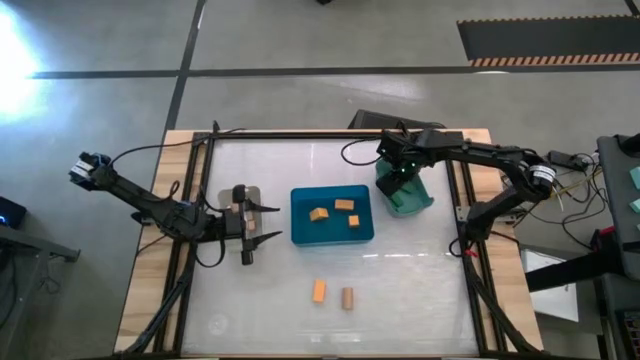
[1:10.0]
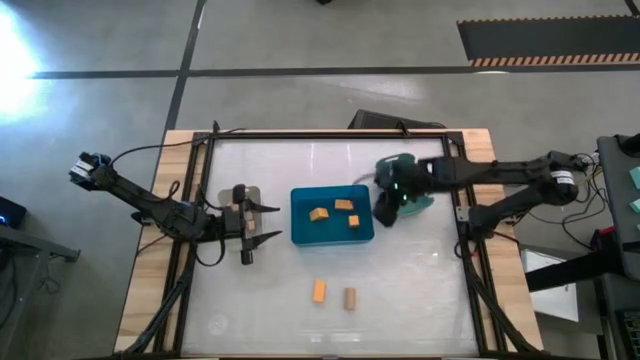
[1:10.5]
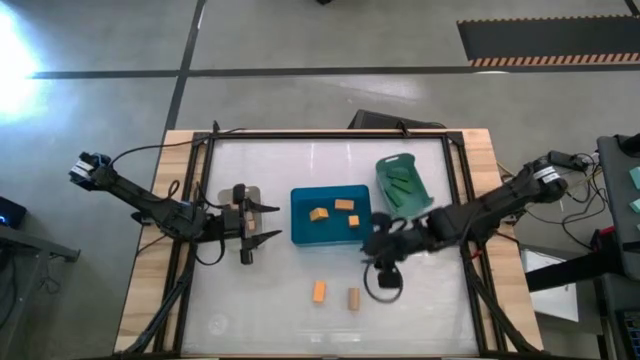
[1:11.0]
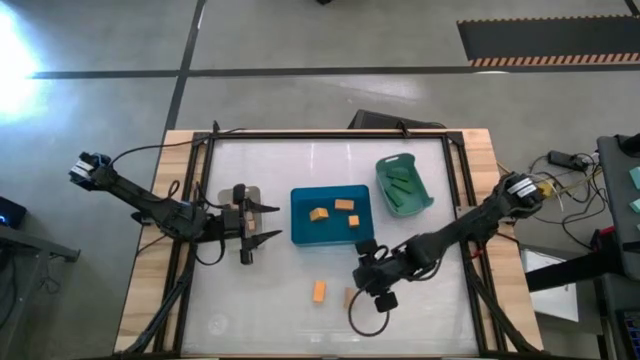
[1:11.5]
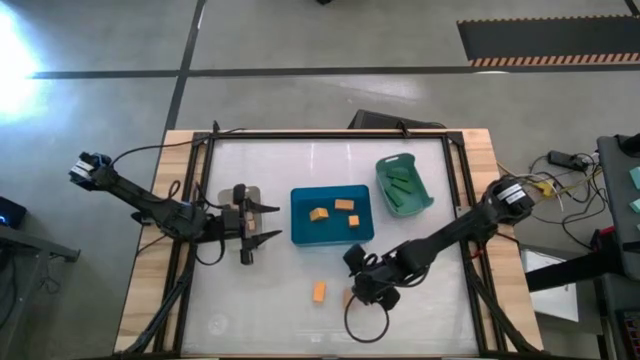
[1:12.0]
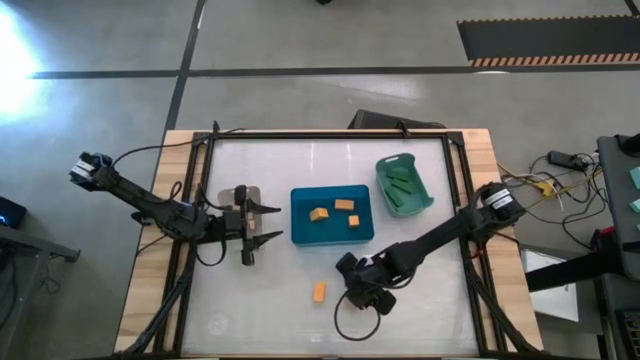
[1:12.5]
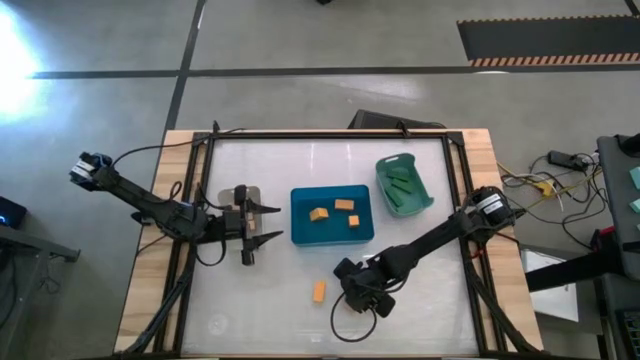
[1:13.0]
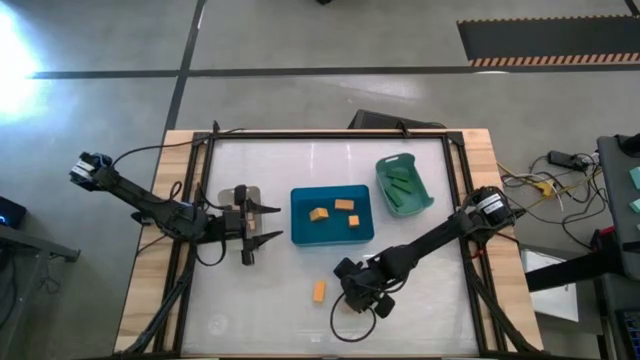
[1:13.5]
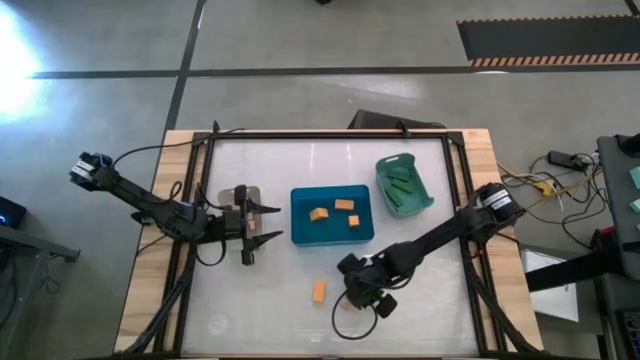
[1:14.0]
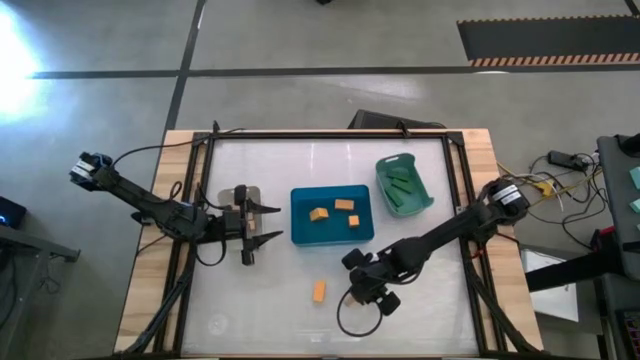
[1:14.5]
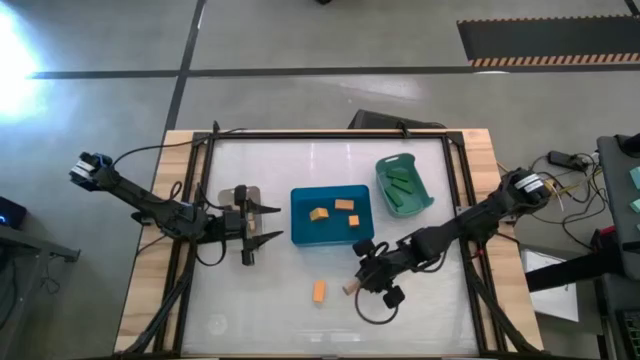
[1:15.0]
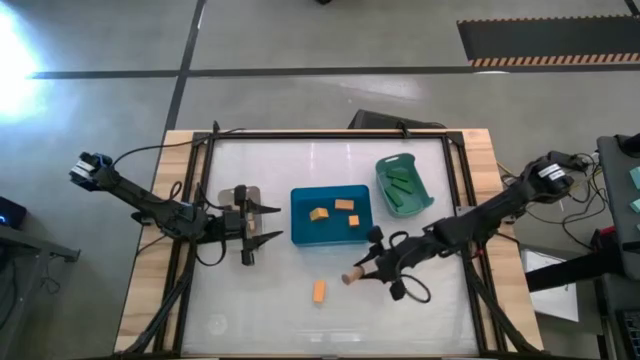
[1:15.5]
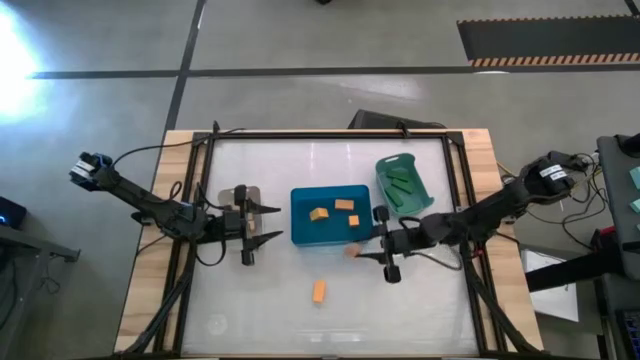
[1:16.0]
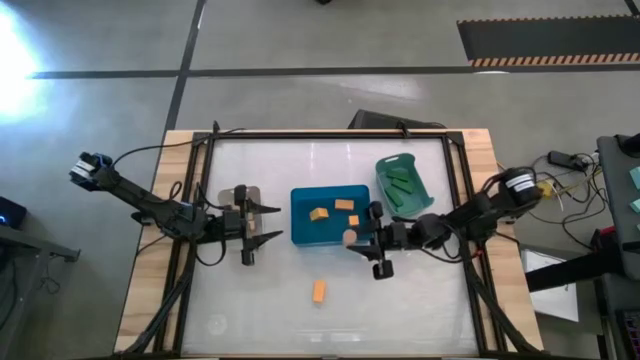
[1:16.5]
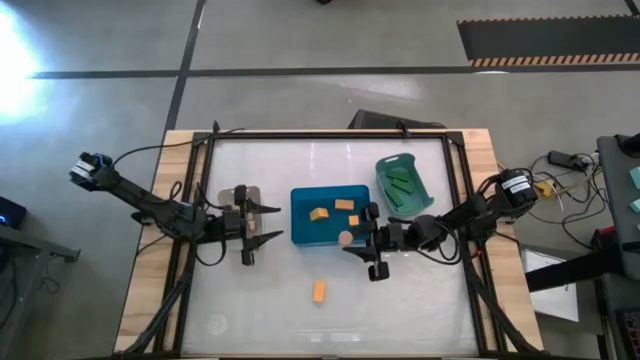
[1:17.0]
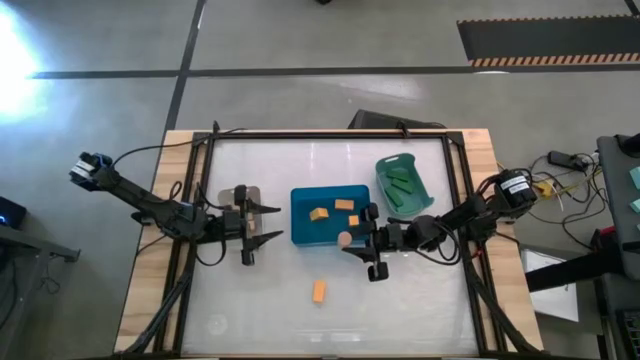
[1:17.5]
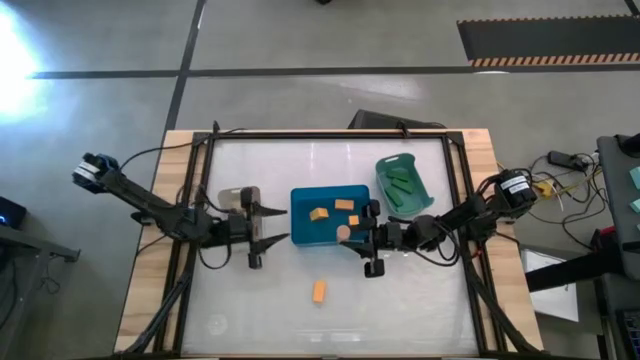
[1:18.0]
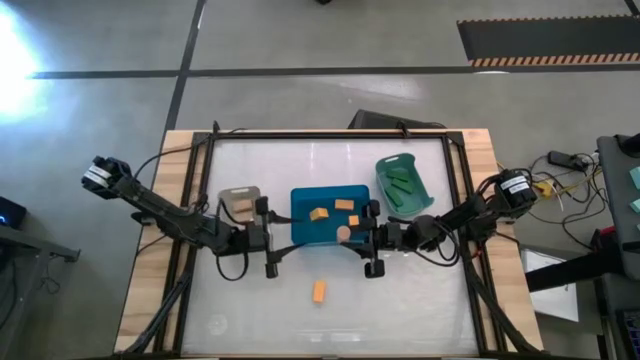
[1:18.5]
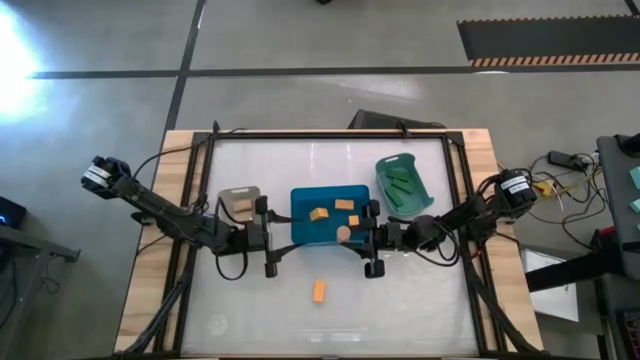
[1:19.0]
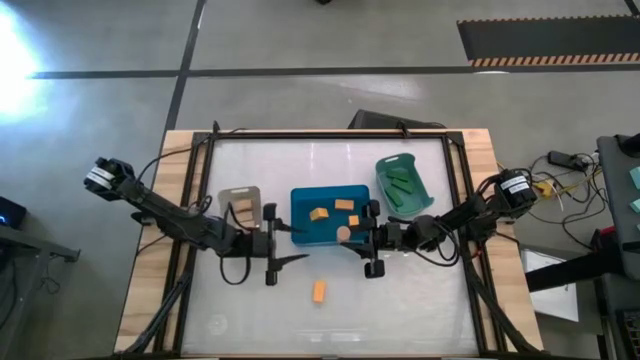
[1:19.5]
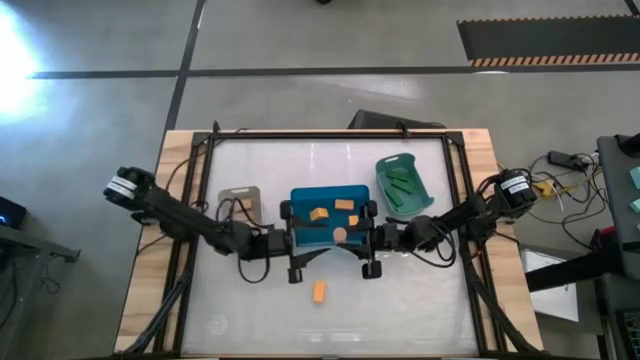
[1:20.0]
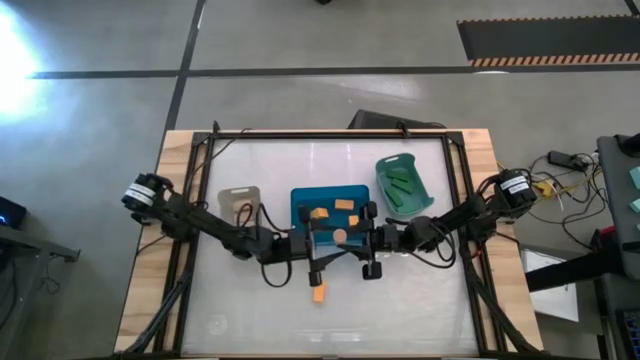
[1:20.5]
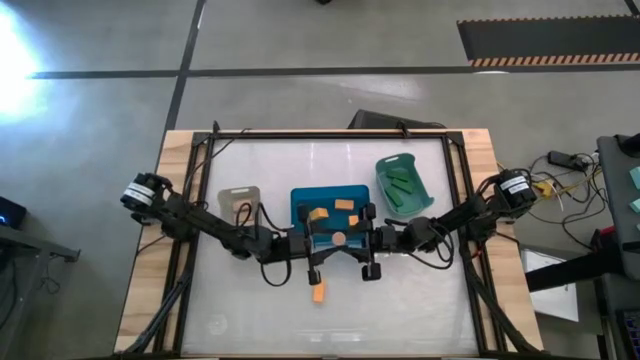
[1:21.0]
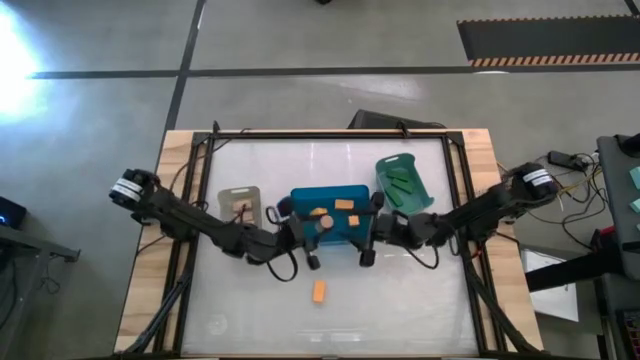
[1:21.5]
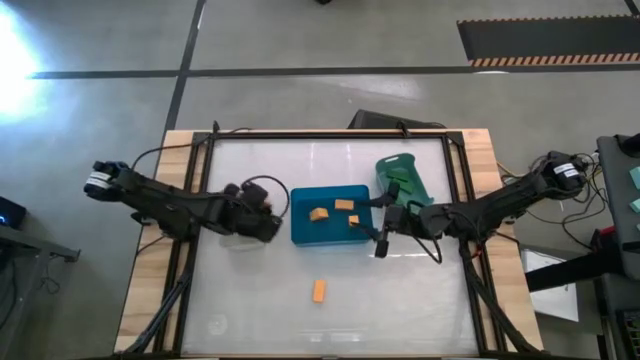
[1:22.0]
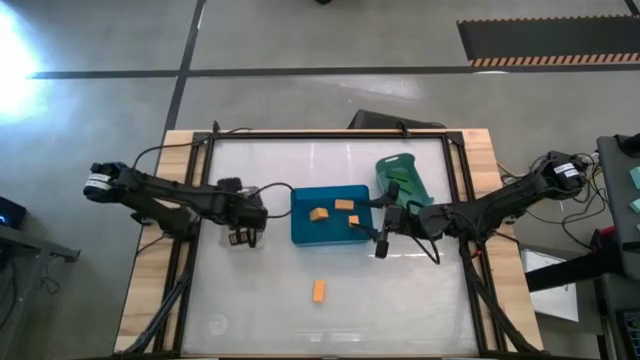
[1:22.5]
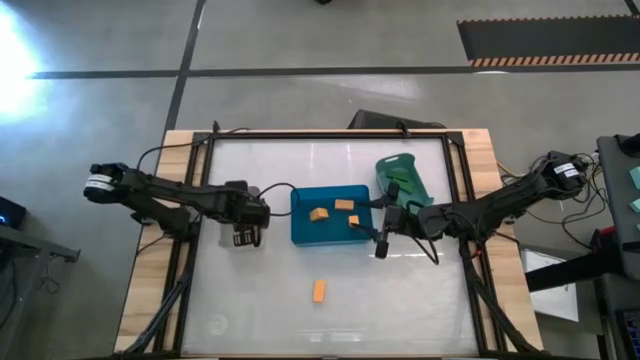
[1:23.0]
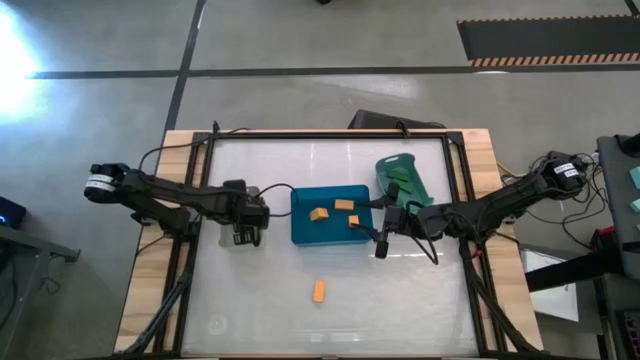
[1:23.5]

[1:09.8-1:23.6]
Task: Sort & place blocks by color
Put the brown game block into the gray bin

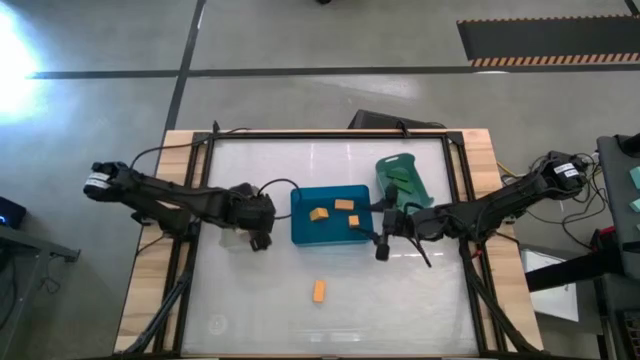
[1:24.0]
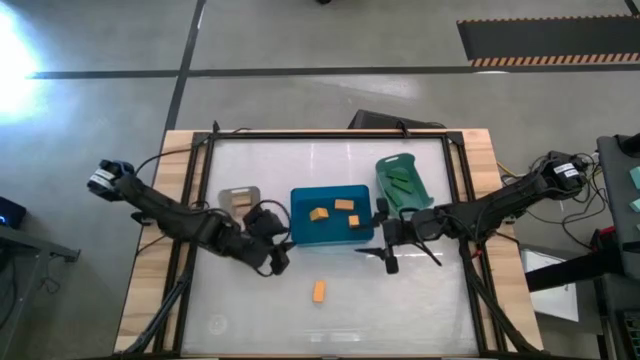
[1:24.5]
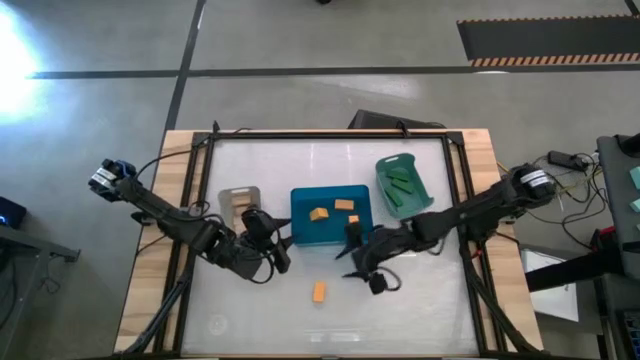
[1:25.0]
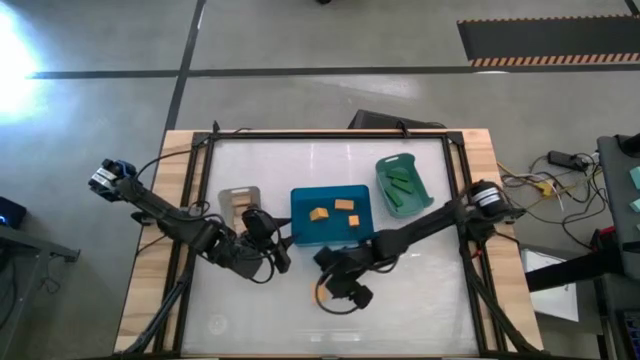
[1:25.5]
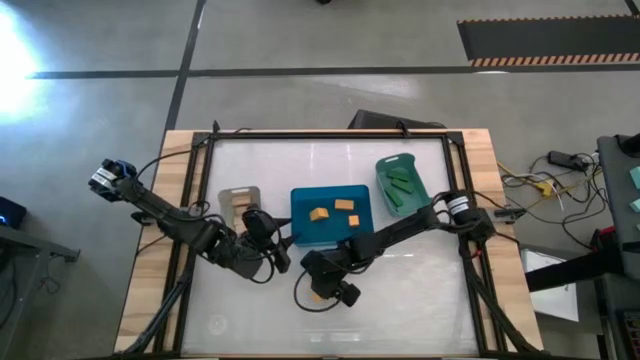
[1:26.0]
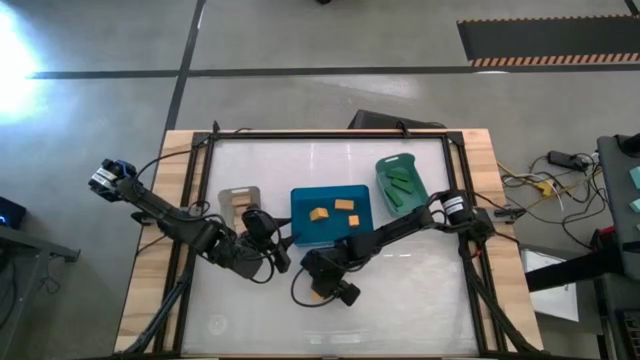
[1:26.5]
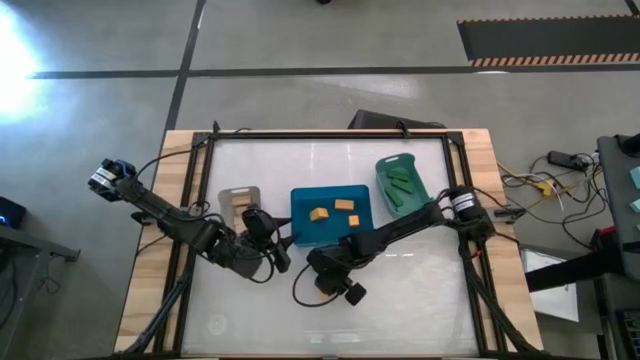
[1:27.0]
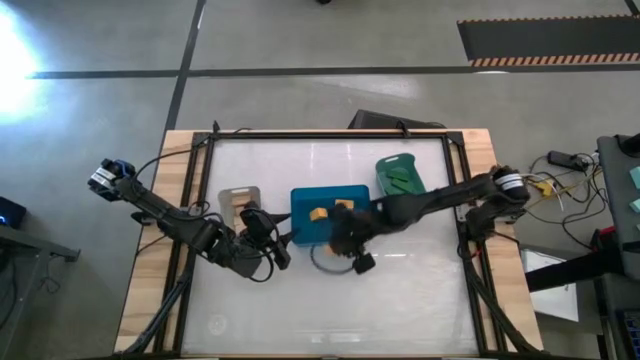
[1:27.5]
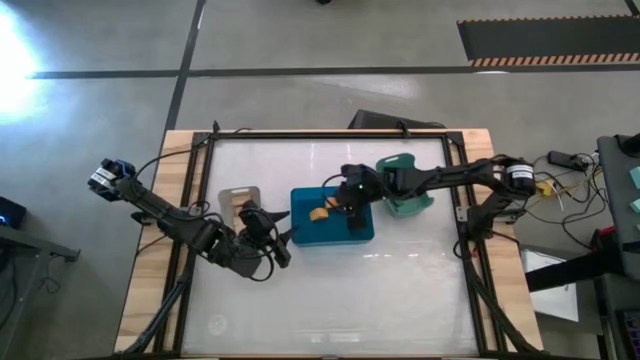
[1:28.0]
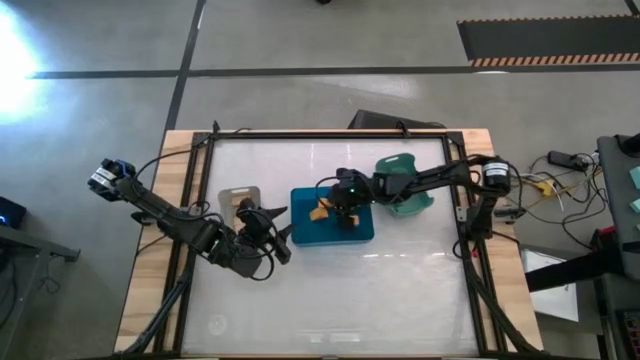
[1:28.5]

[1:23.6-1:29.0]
Put the yellow block into the blue bin

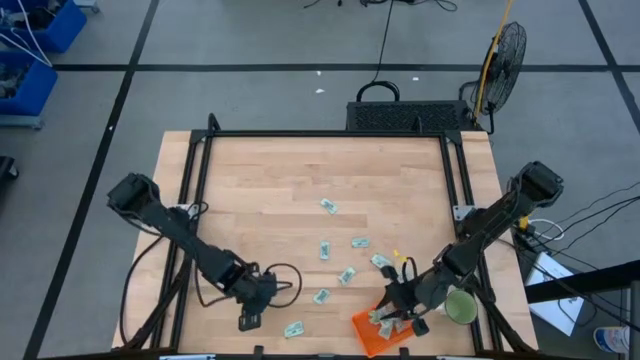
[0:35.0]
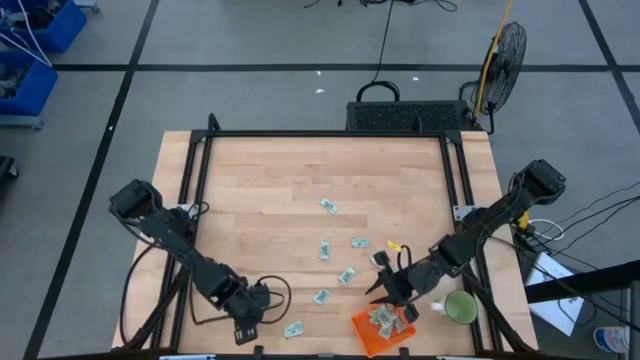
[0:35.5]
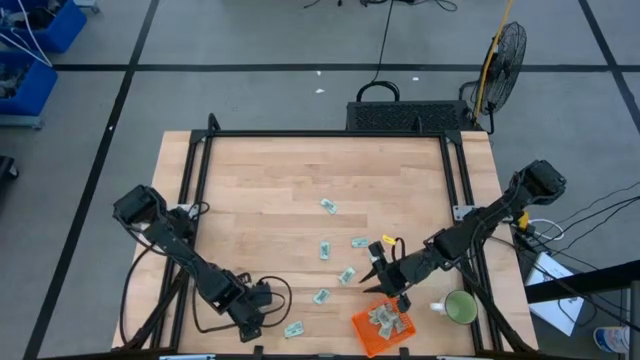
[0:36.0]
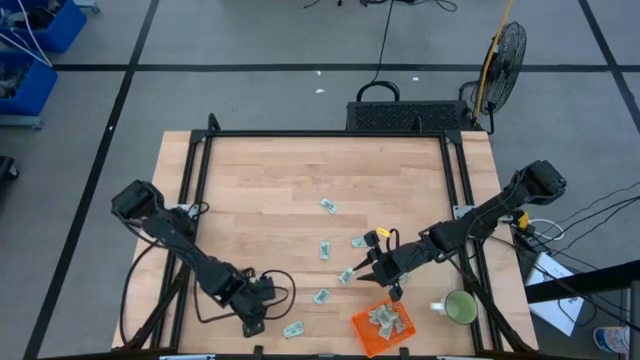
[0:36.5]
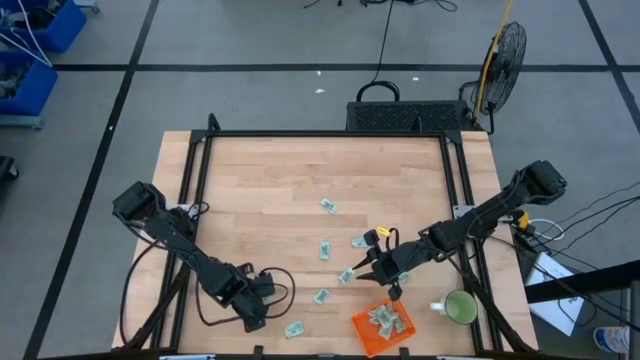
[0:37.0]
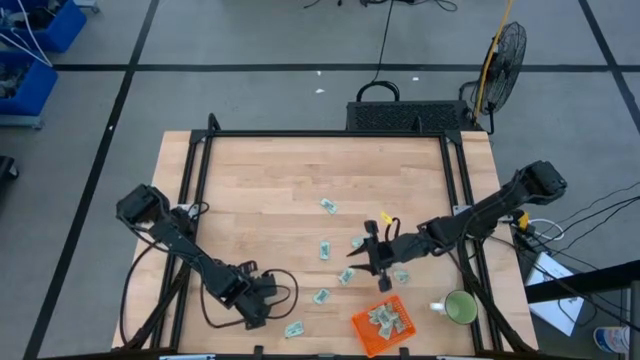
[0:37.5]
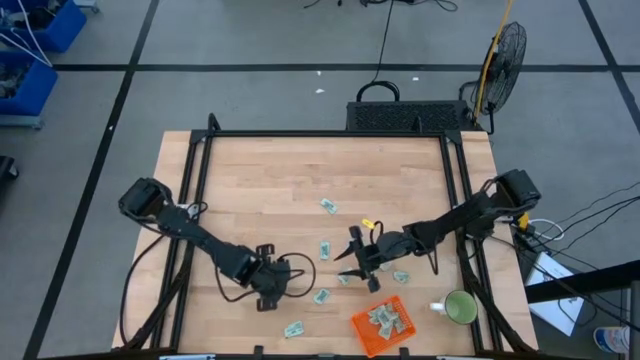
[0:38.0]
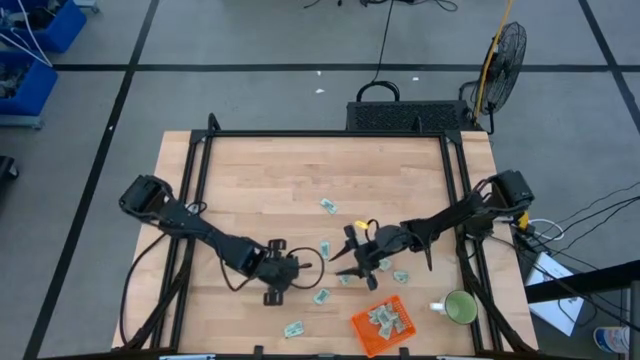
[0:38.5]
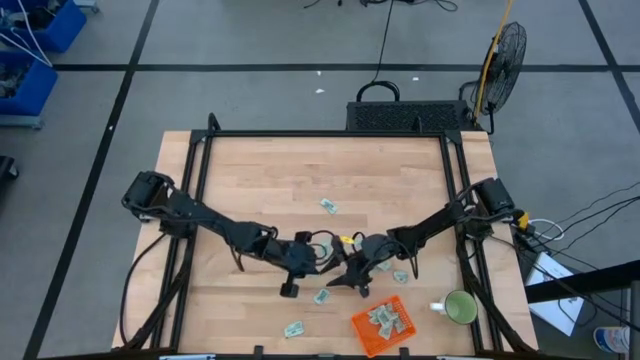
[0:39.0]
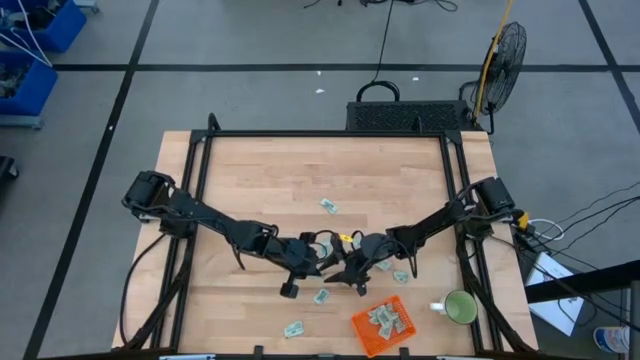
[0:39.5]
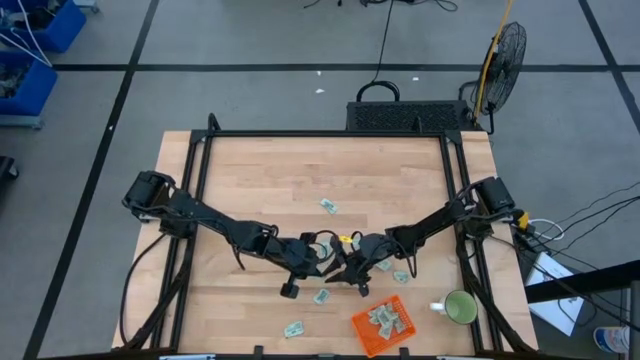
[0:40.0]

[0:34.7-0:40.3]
Task: Pick and place Stevia / Truvia into bins
Put the stevia packet into the orange bin
